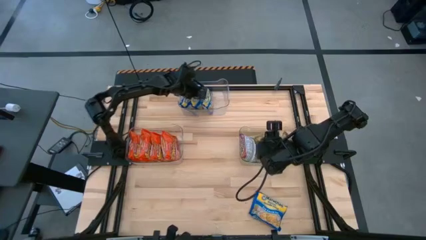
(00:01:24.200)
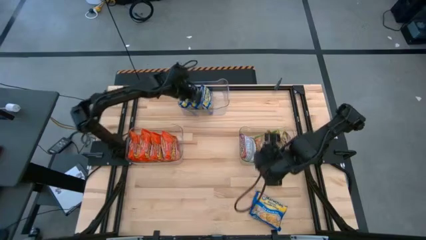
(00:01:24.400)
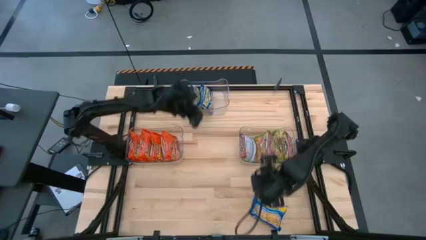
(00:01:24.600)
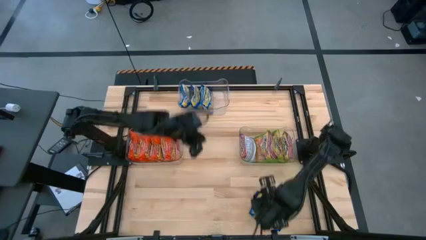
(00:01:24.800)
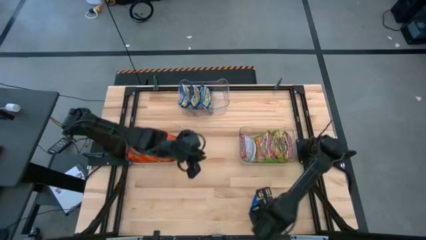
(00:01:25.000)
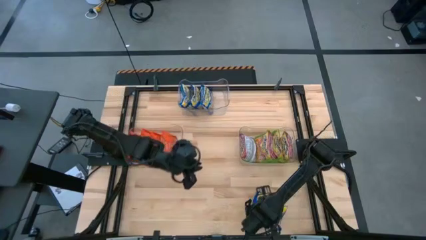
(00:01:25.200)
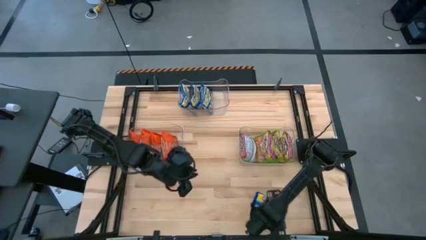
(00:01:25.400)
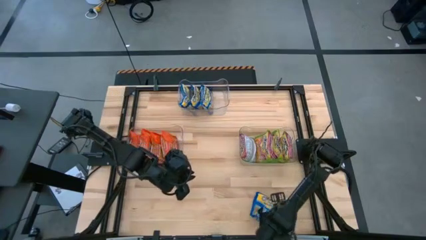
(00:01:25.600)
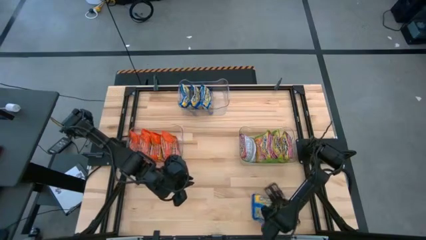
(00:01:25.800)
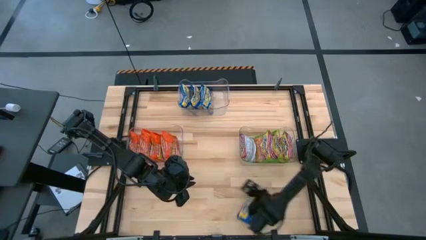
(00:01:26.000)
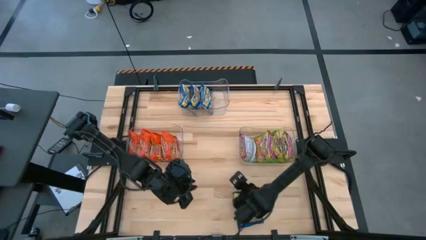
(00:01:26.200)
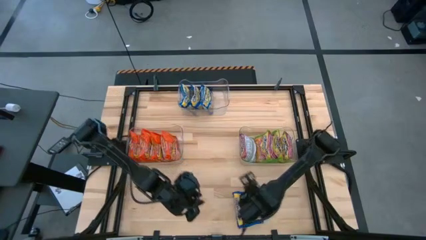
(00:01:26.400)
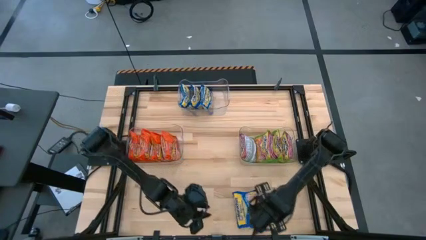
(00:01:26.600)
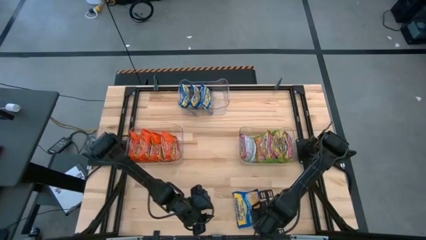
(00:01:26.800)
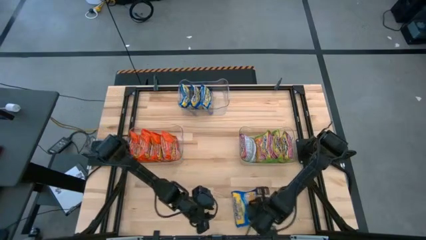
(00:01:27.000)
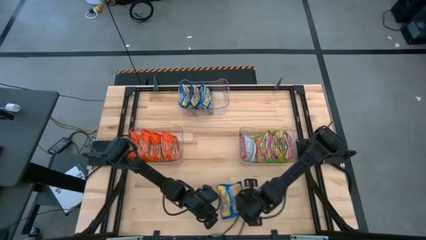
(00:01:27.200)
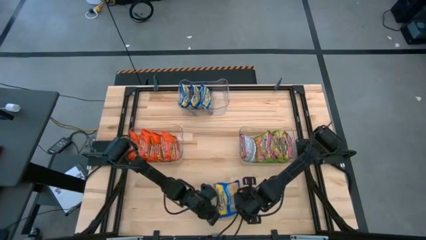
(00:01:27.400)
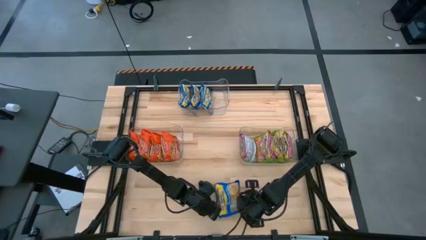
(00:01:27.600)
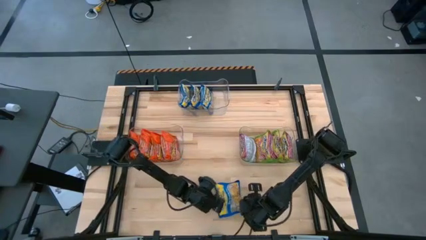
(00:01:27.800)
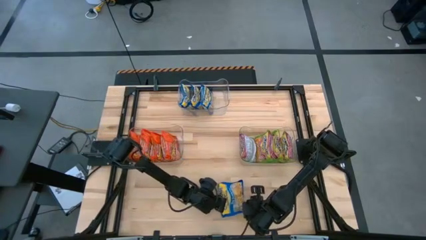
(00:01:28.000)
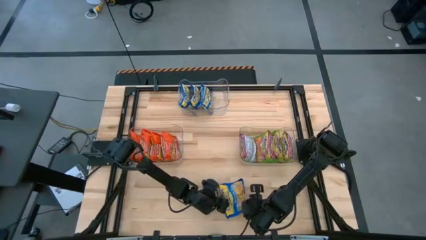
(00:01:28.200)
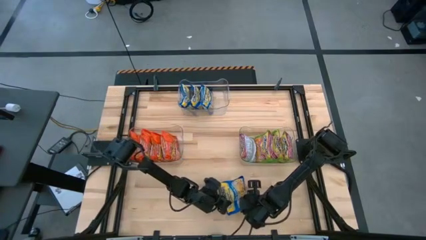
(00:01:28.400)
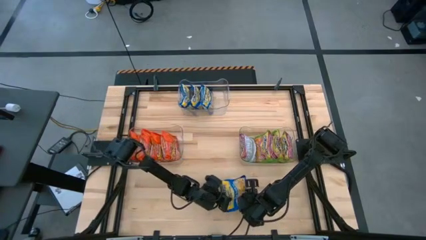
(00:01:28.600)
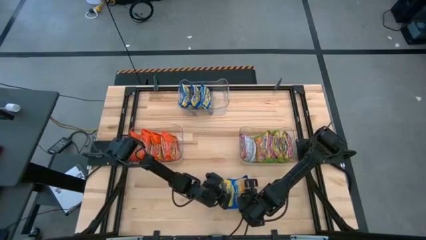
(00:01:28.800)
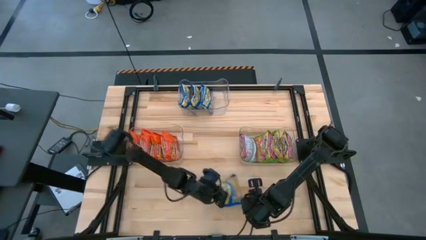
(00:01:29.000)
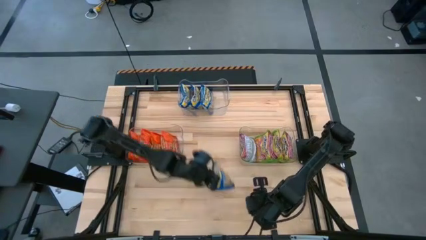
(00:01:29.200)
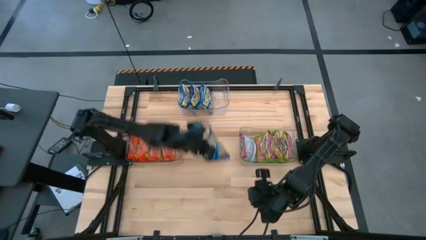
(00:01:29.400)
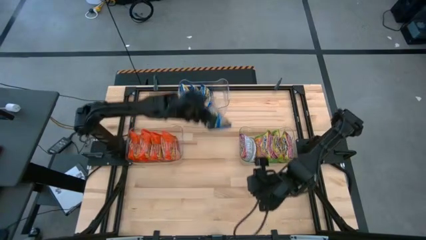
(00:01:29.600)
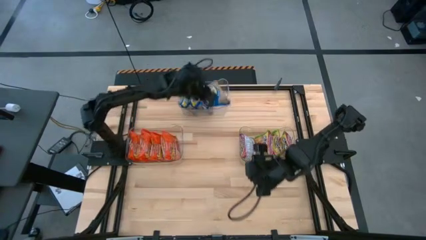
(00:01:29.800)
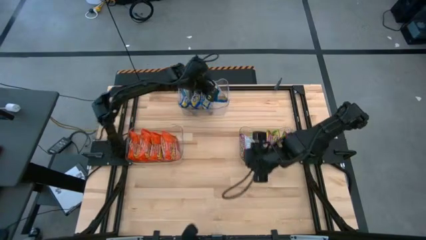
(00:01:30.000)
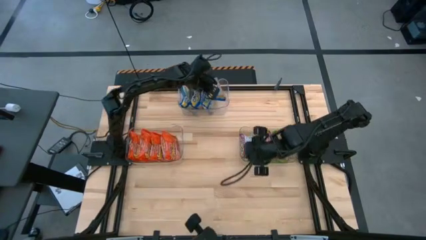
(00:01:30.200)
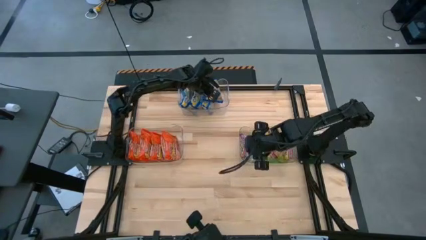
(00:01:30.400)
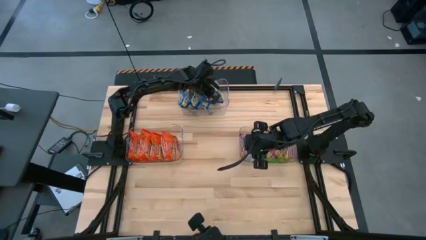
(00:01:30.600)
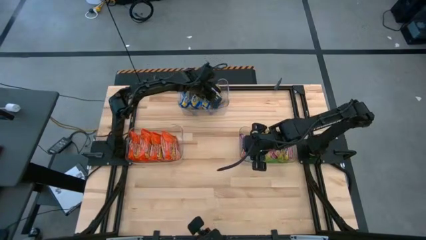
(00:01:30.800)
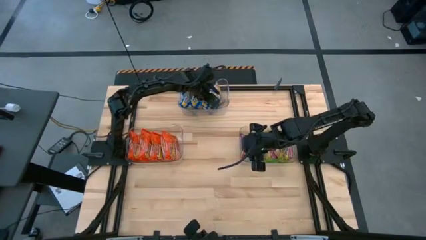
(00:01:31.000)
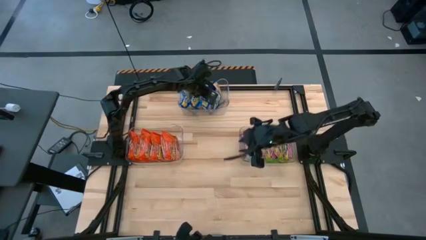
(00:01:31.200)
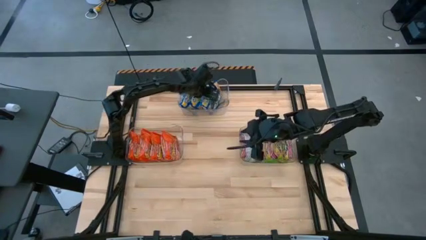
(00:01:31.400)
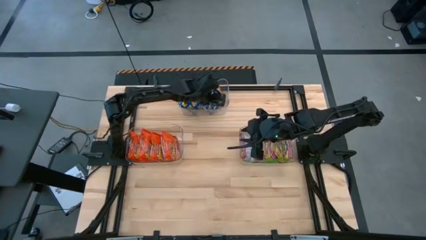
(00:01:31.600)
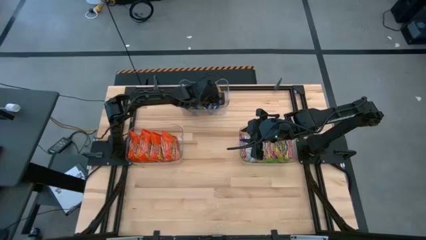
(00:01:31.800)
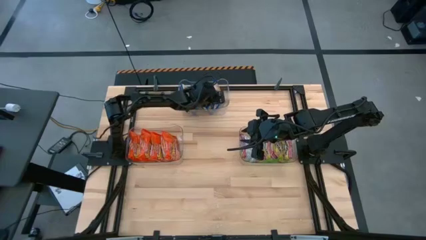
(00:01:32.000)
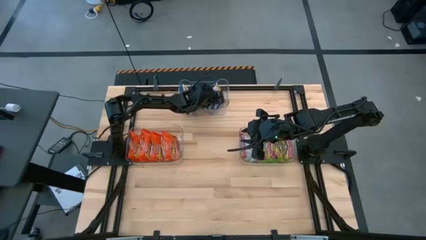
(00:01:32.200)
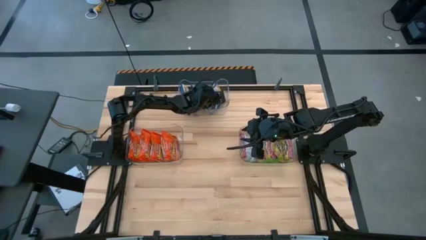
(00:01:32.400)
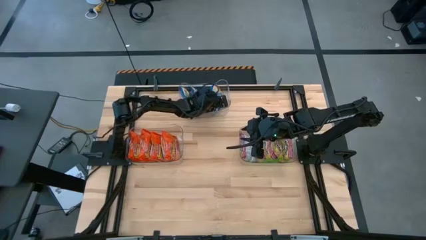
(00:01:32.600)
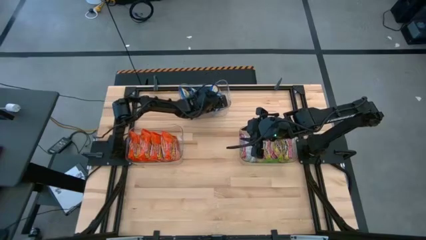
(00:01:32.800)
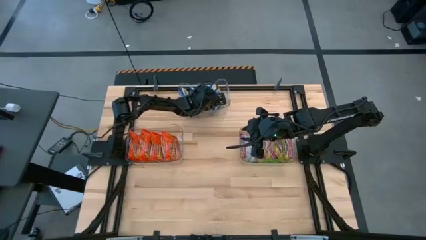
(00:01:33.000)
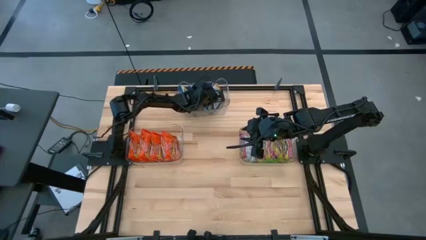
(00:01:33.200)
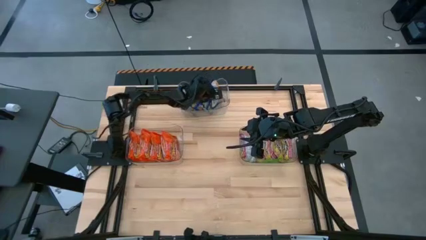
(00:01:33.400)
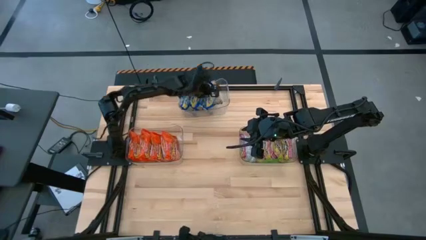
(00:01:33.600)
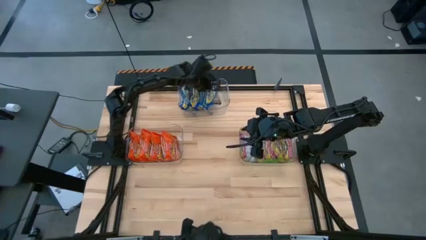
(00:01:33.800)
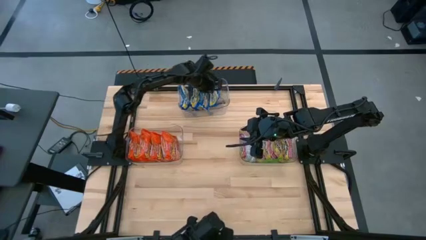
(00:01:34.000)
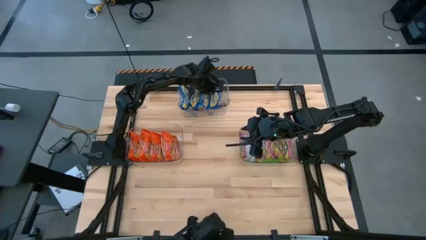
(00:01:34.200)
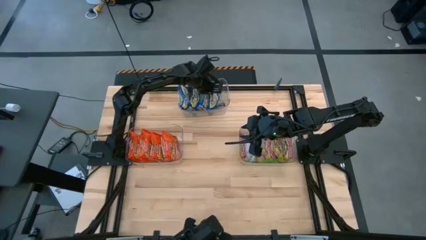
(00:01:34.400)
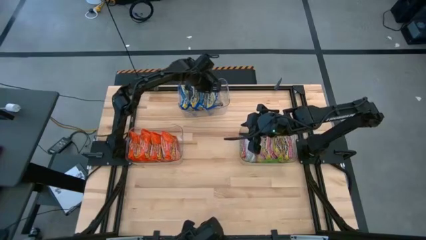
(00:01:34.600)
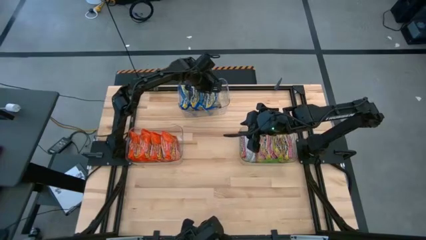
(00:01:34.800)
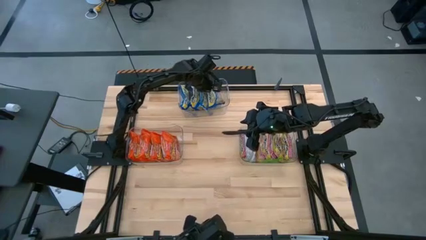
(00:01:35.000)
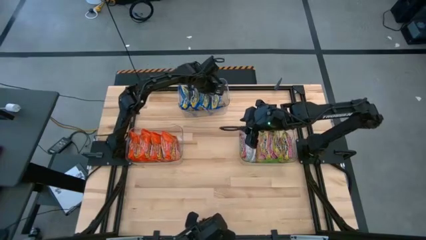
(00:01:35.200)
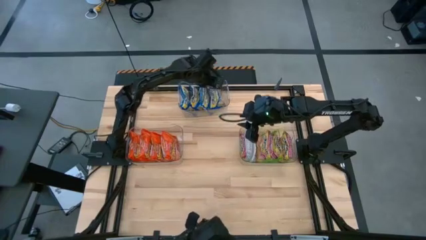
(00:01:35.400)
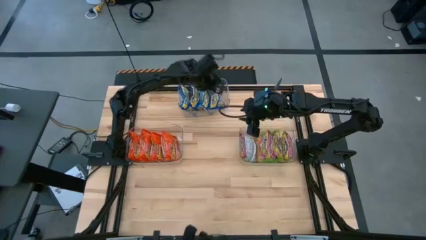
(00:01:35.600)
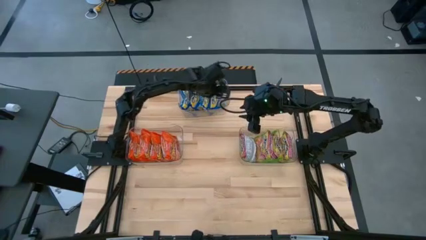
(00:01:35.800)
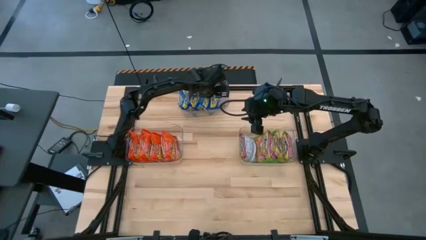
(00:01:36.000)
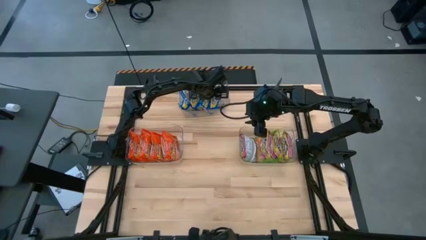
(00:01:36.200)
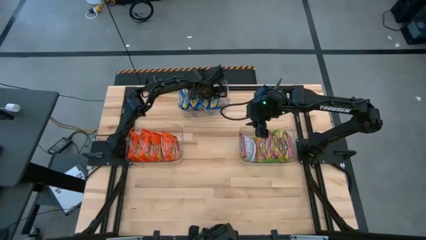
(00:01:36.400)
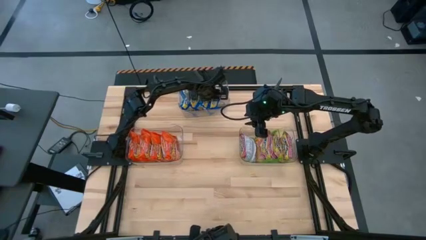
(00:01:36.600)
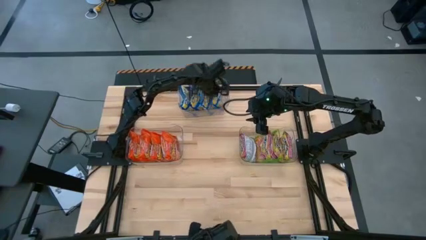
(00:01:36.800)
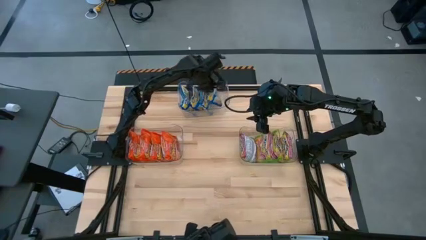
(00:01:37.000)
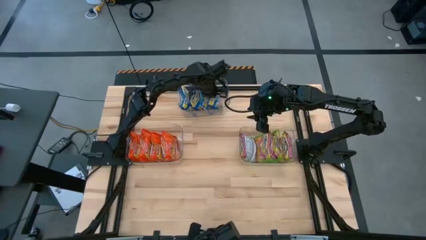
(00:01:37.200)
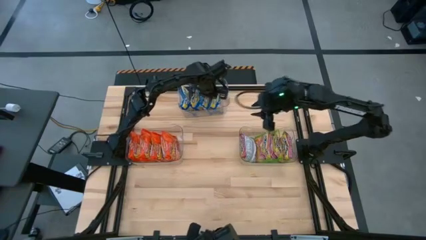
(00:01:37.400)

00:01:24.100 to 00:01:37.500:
Task: Sort Maruchan noodles
Put the blue noodle into the top transparent bin

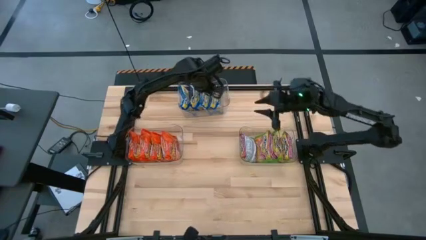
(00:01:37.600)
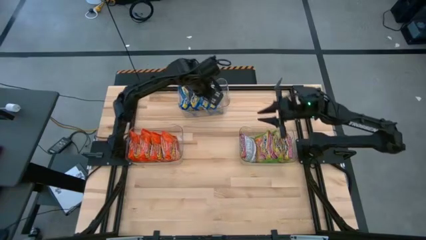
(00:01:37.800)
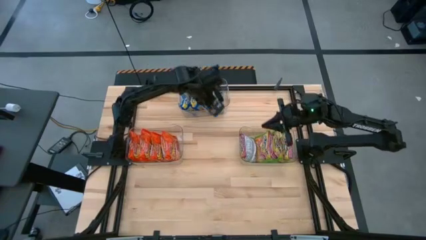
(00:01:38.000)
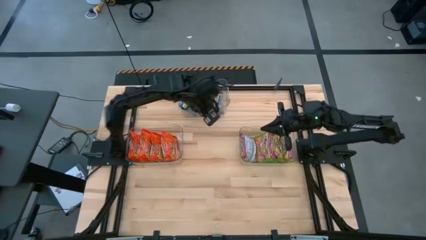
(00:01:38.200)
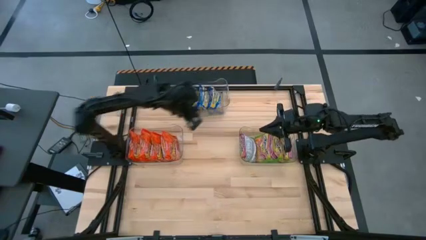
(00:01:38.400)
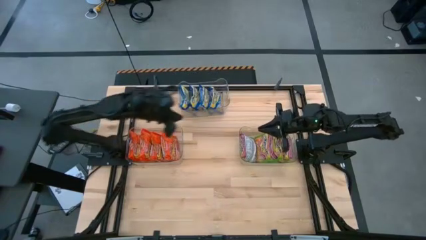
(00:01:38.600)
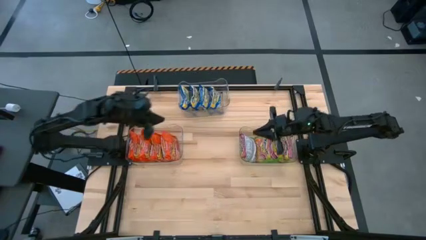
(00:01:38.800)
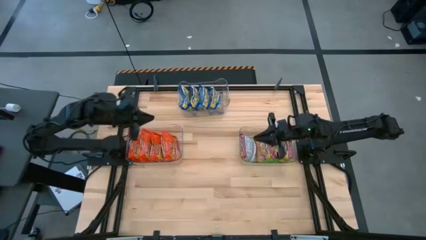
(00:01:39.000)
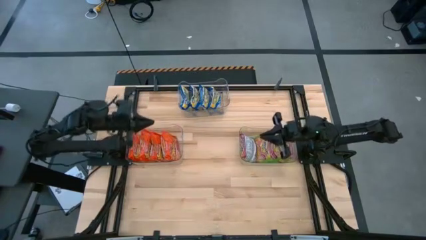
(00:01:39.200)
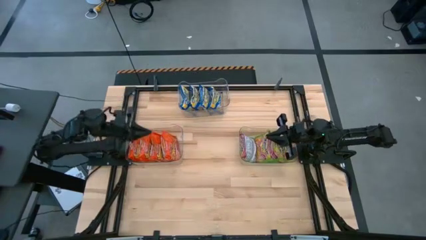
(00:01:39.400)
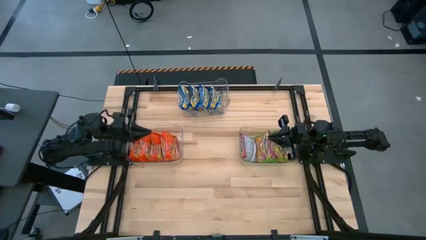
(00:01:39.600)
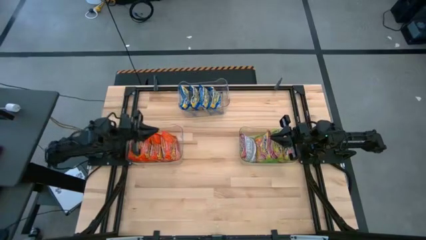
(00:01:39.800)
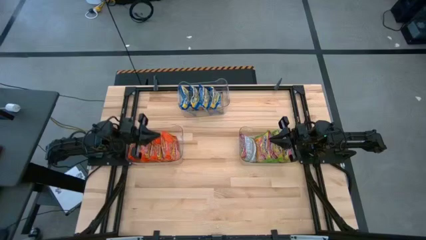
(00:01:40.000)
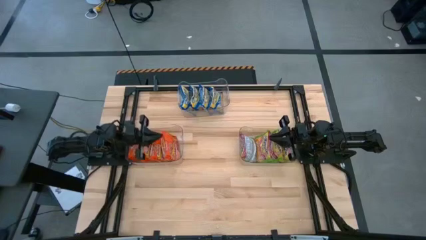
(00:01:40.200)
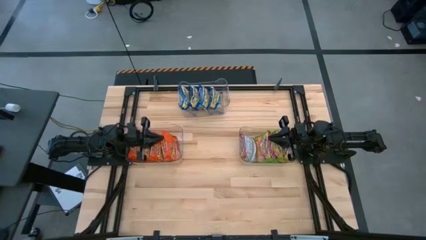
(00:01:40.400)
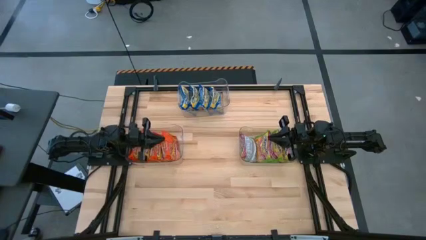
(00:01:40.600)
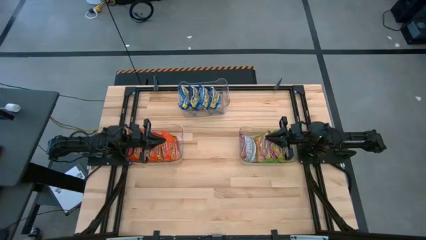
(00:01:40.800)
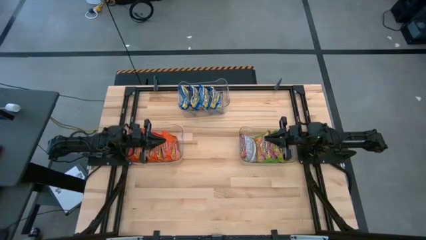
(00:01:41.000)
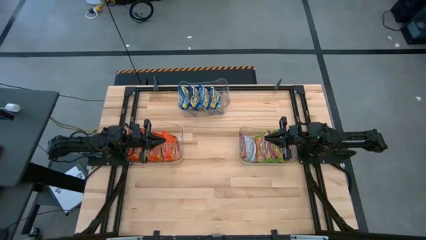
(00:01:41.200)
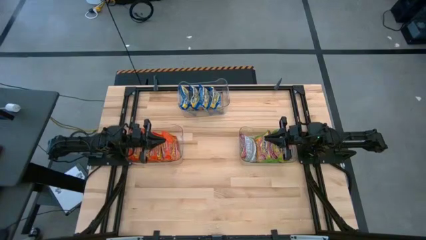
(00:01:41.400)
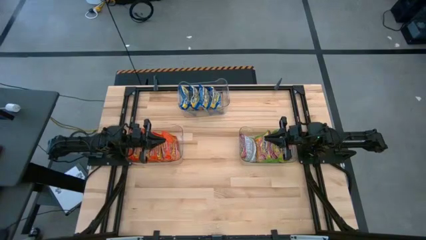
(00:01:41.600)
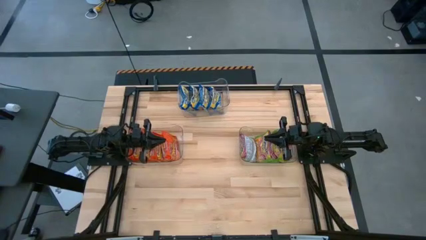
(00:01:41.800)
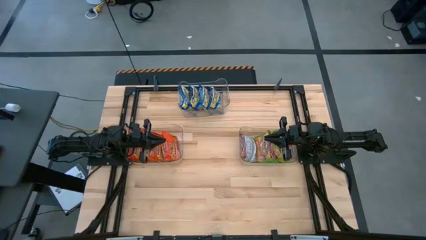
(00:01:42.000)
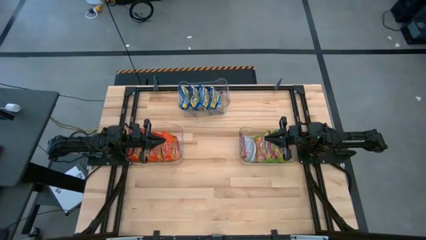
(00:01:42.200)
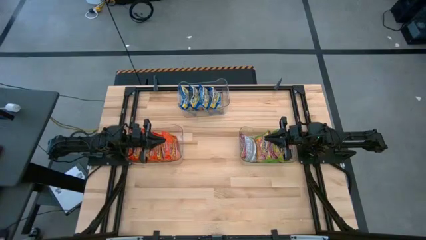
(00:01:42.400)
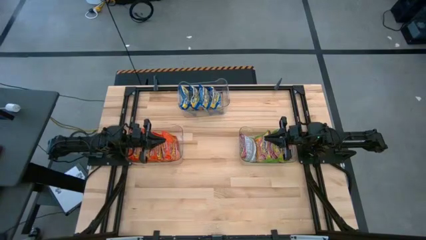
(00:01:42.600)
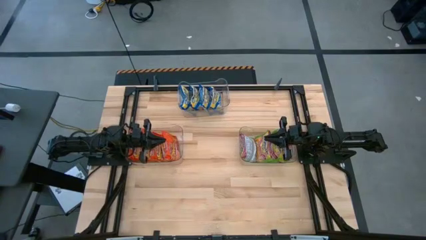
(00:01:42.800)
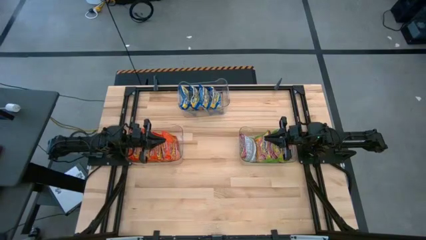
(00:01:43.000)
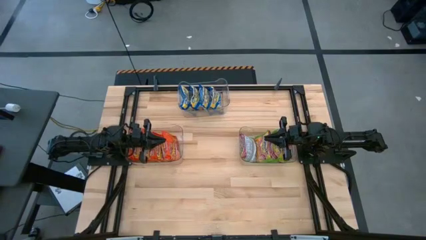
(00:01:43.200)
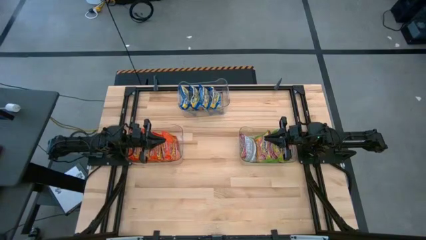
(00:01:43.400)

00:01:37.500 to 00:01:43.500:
Return to Home Position
